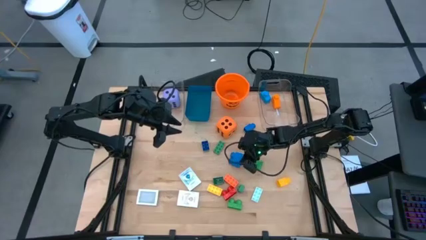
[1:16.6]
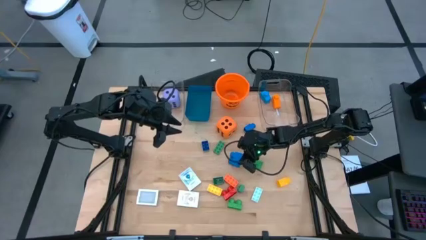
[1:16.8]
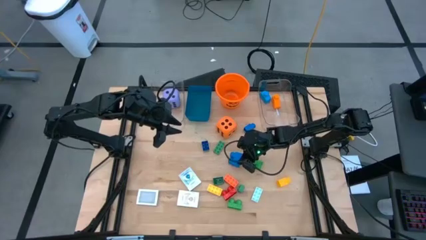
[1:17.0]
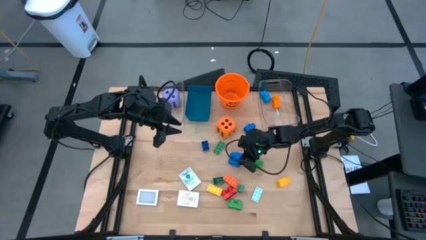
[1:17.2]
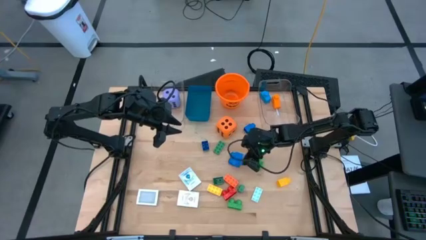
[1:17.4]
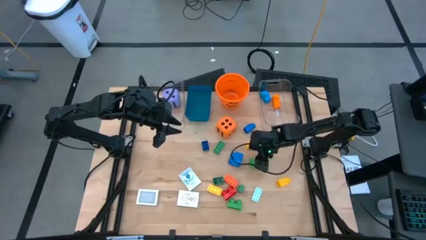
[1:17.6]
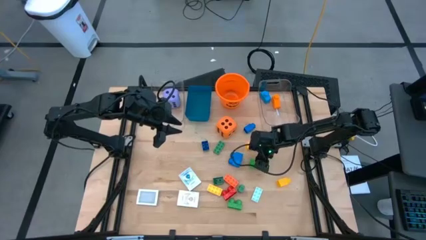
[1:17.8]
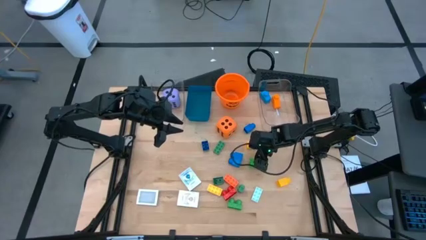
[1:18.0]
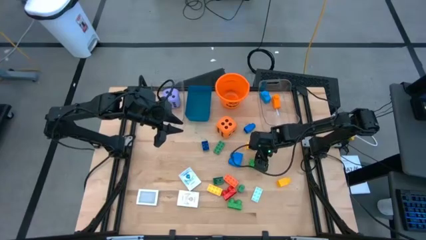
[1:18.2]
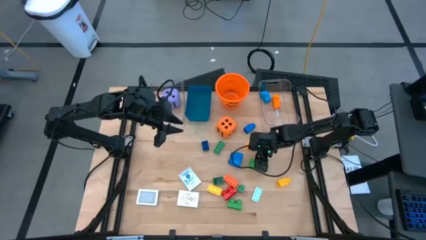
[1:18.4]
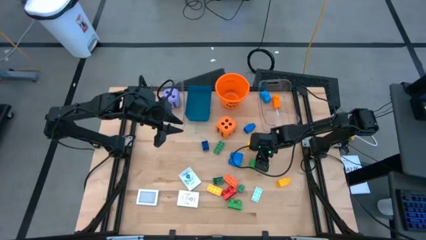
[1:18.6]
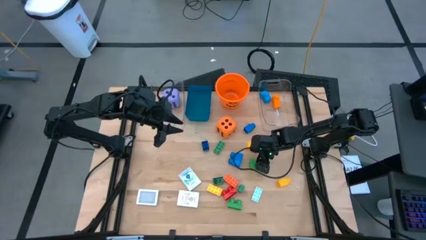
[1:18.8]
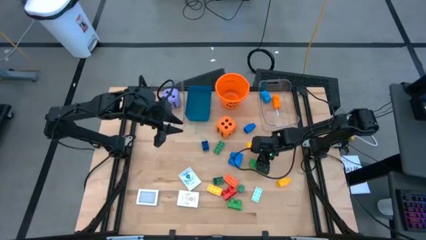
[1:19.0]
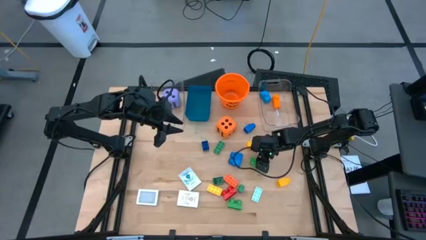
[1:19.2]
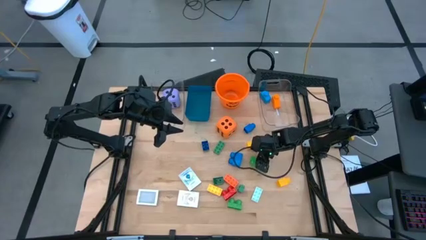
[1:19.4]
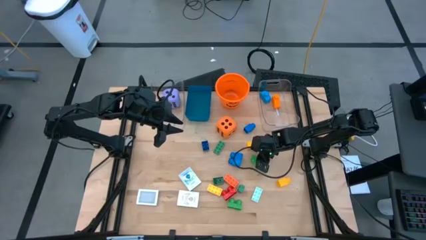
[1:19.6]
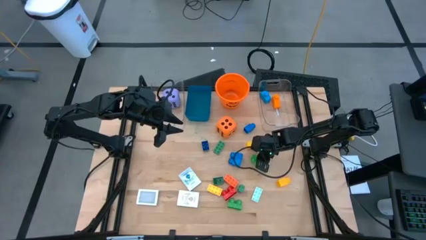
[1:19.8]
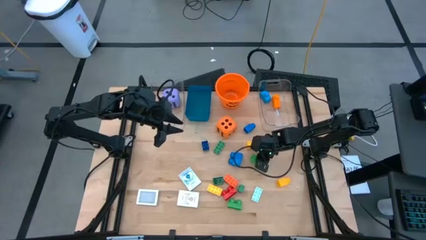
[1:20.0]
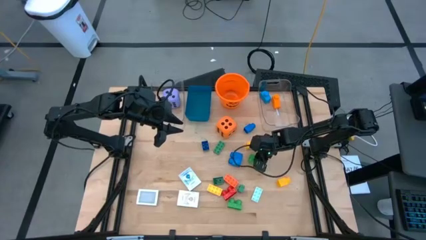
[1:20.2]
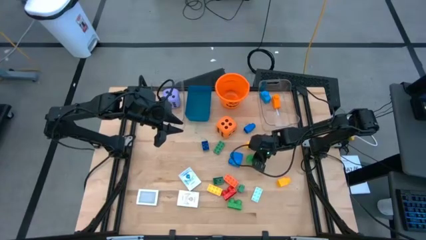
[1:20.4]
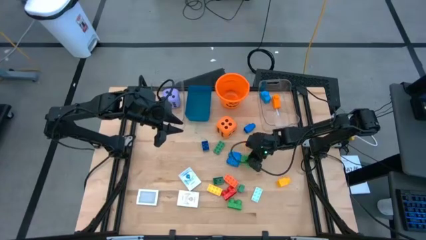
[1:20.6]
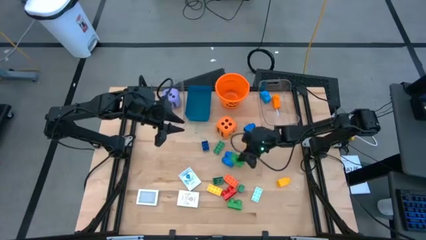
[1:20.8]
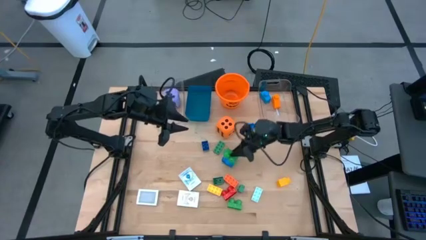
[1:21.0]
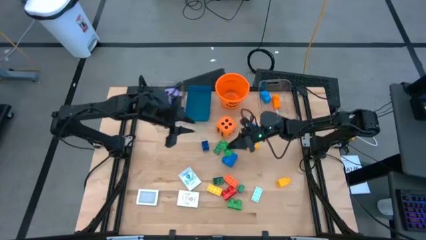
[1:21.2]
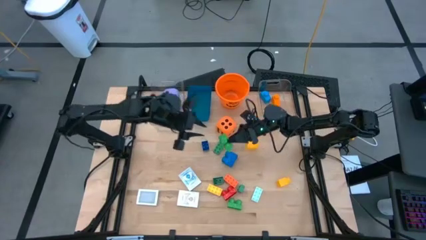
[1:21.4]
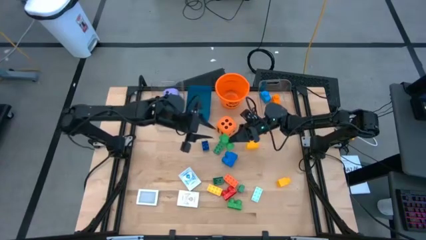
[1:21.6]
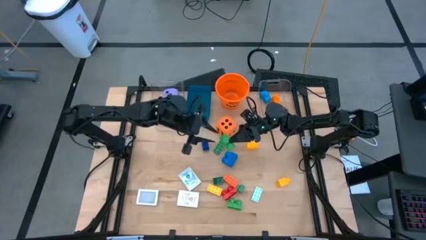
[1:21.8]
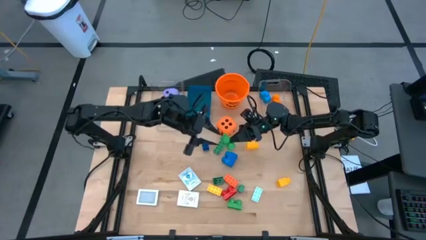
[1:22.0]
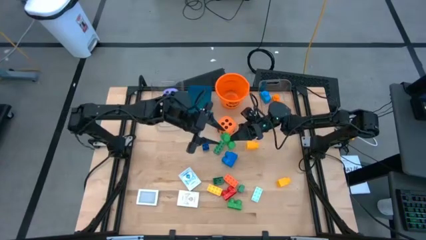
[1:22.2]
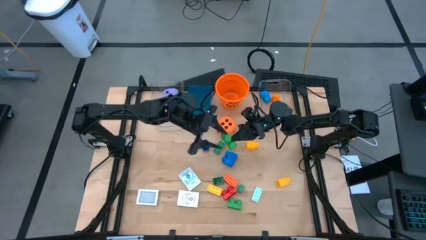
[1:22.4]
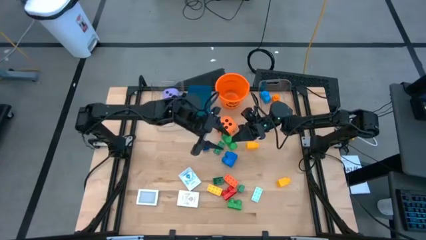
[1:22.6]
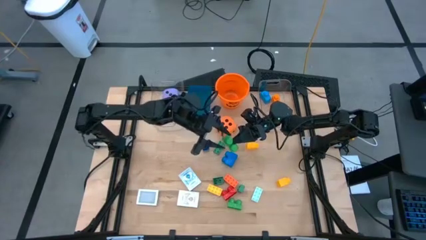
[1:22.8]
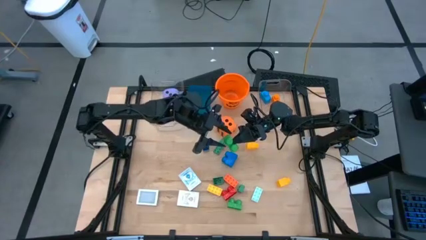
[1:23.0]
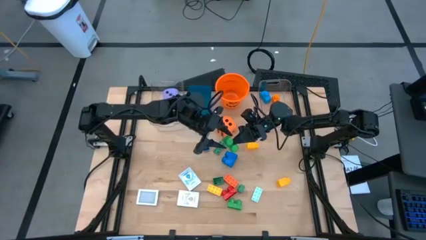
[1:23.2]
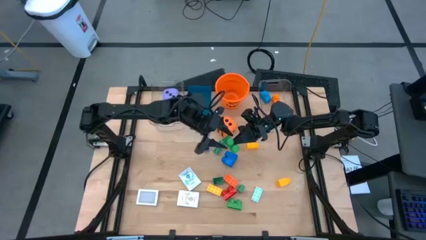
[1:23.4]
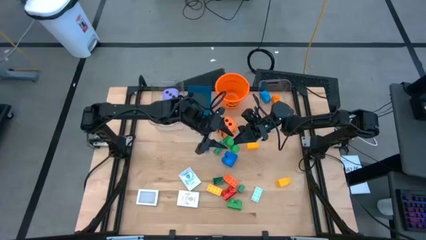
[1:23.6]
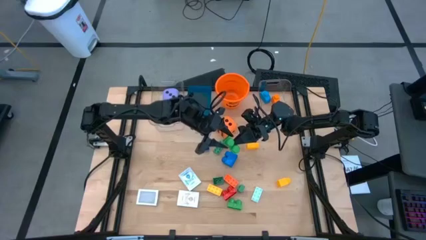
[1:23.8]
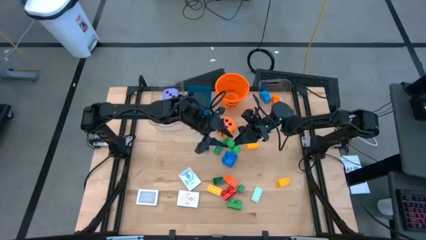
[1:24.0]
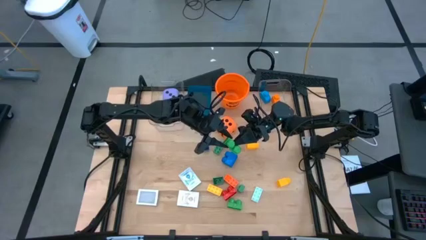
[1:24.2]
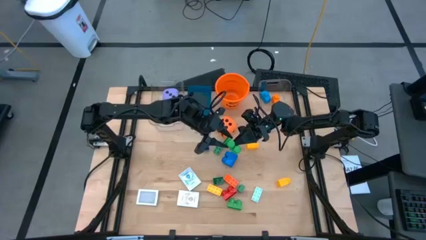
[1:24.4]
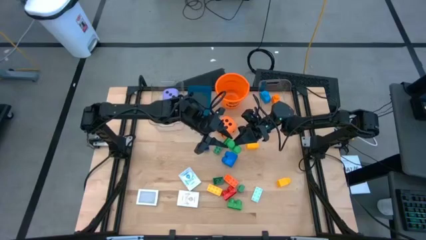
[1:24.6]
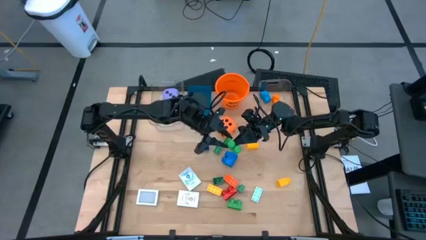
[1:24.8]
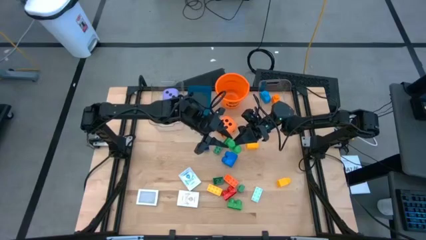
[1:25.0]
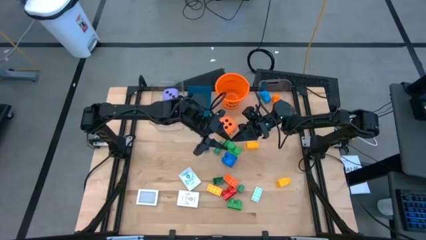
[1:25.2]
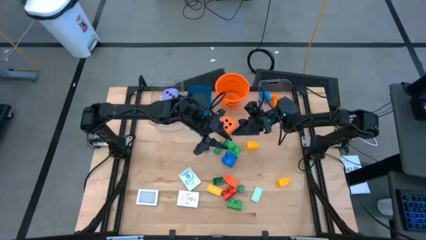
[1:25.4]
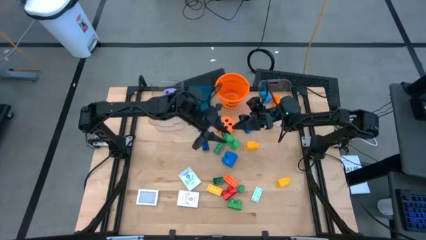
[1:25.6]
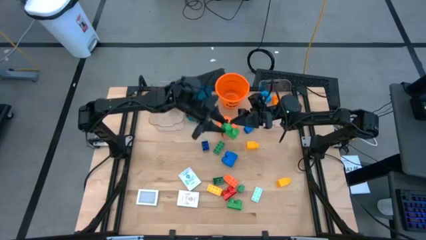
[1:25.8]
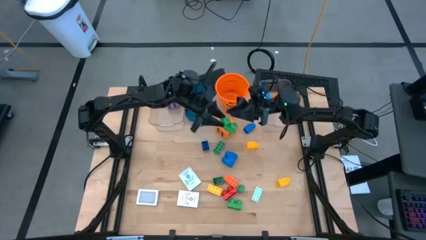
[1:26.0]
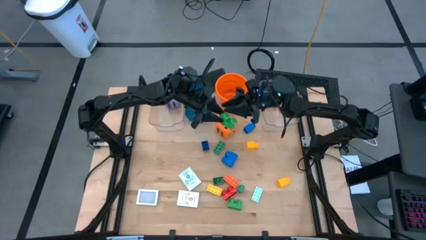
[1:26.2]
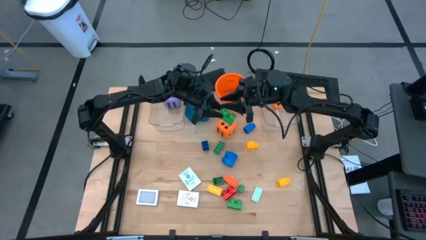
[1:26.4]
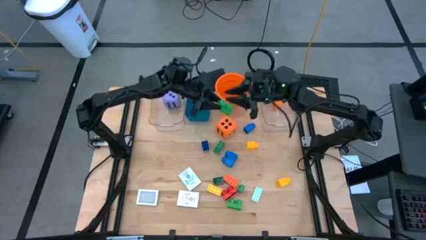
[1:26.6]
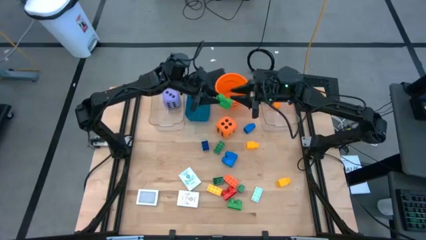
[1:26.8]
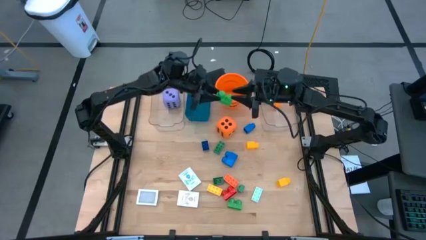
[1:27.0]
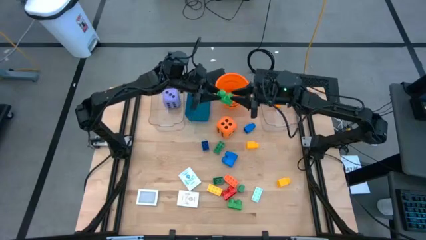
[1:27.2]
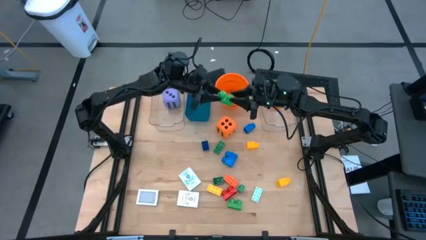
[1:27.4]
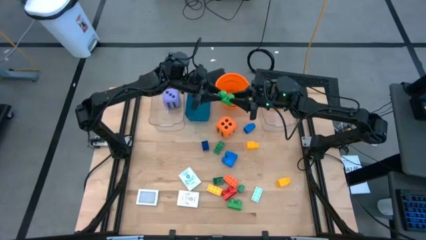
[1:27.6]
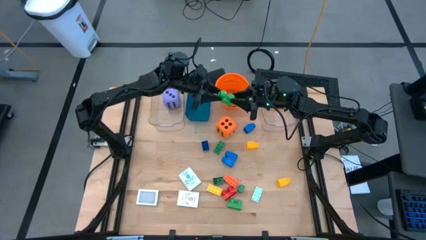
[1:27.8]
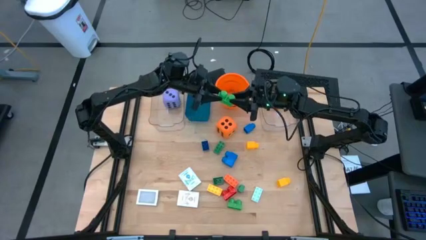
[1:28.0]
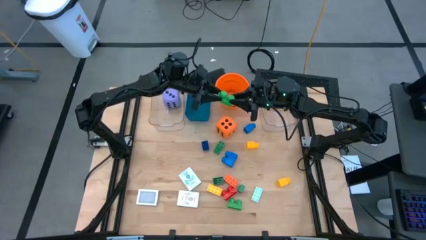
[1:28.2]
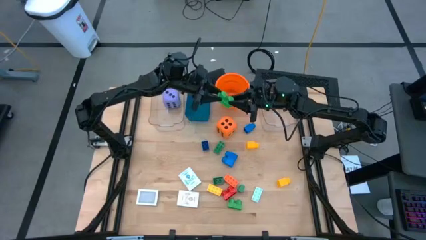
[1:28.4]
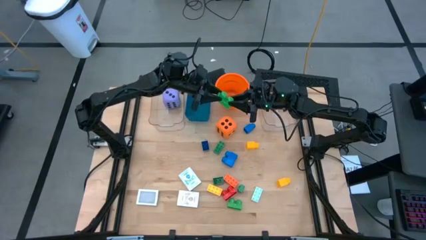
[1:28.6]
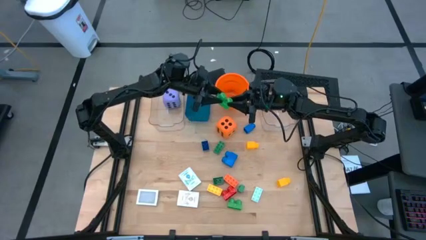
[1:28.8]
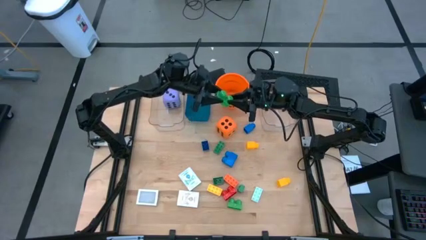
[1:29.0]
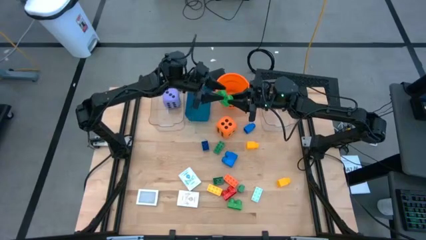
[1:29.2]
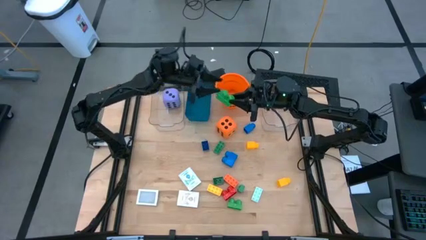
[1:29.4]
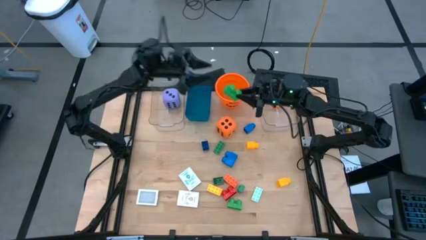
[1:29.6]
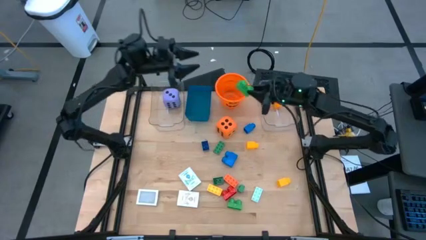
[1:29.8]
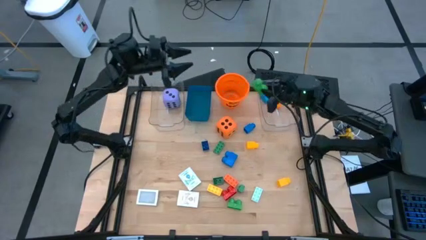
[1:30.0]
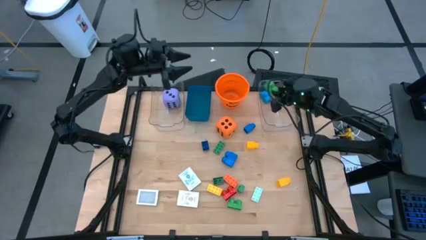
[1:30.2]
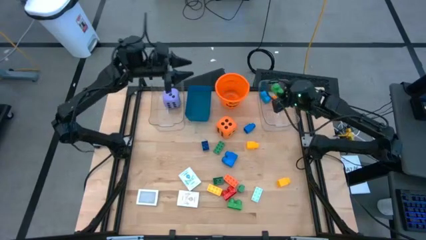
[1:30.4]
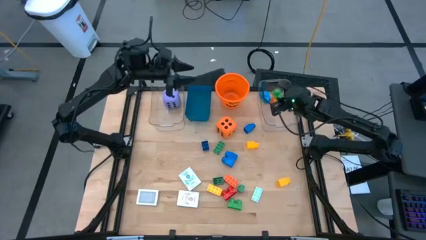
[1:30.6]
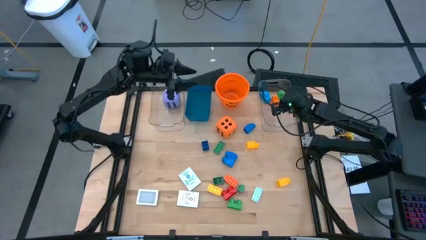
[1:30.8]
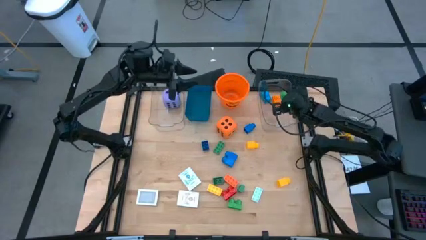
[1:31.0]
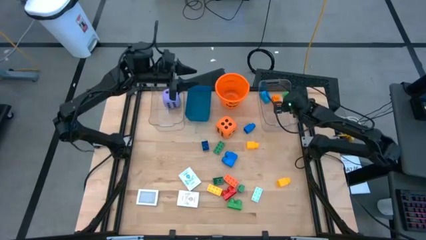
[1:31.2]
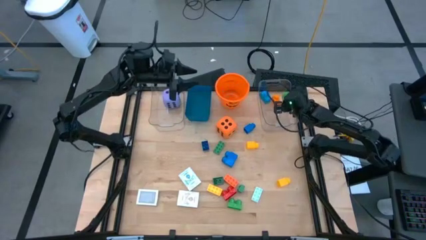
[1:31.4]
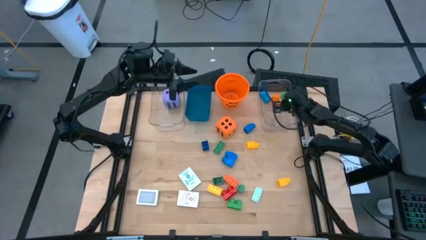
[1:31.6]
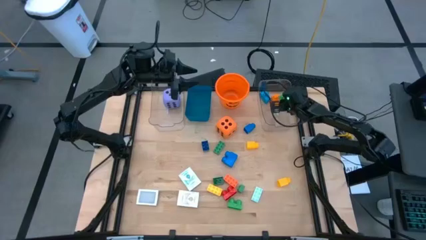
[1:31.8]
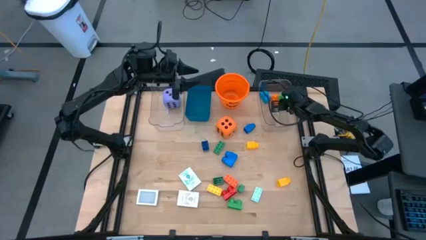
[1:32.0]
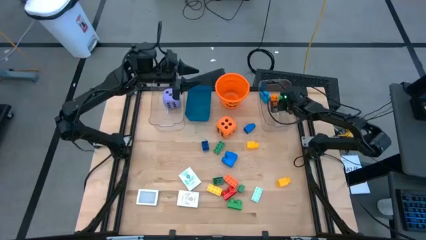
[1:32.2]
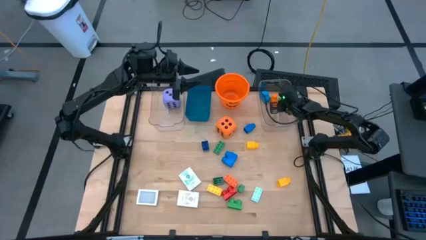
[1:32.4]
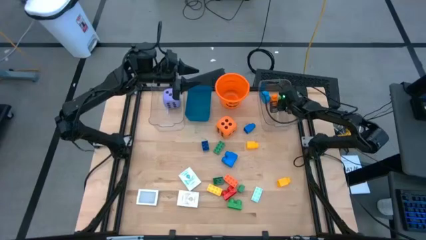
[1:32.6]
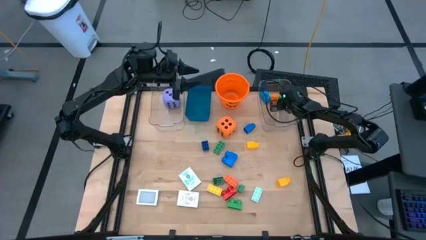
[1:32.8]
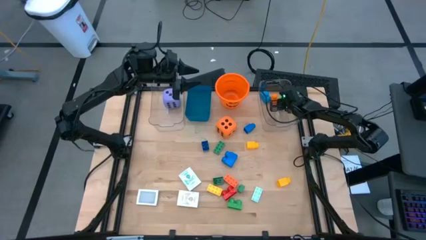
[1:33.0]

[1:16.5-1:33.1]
Task: Pick & Place Toys
Put the green game piece into the right transparent bin
